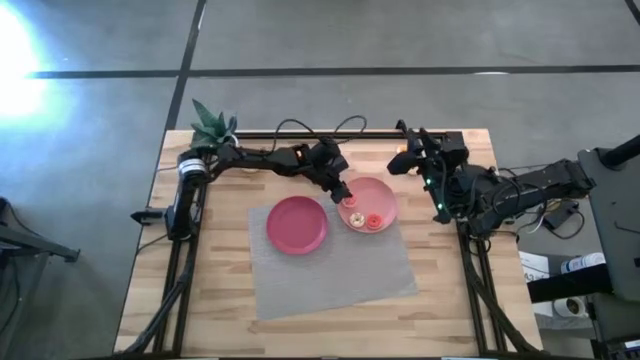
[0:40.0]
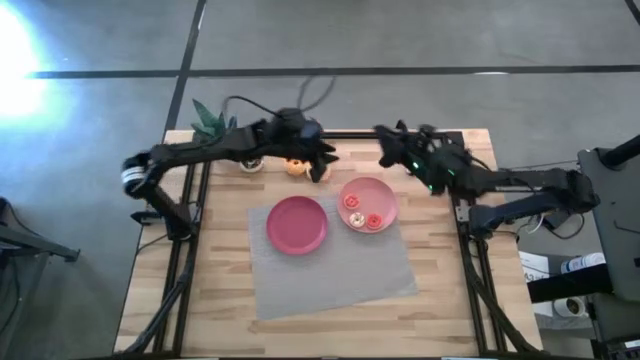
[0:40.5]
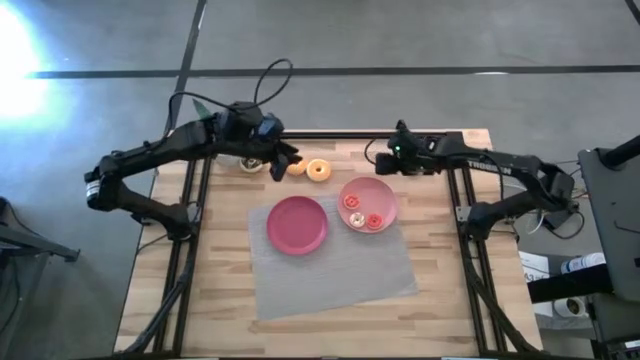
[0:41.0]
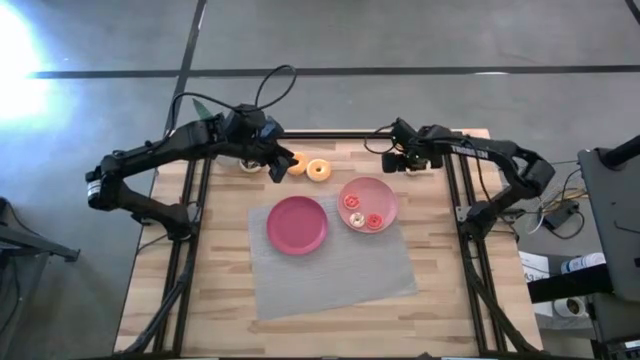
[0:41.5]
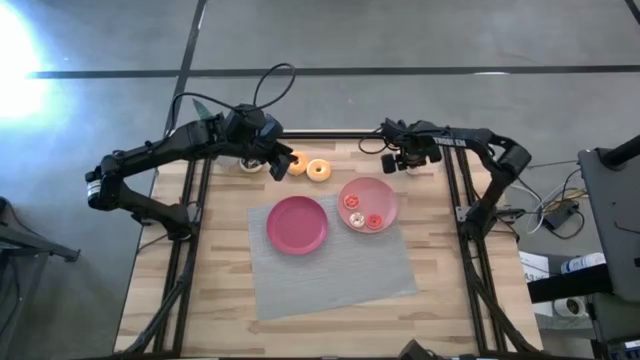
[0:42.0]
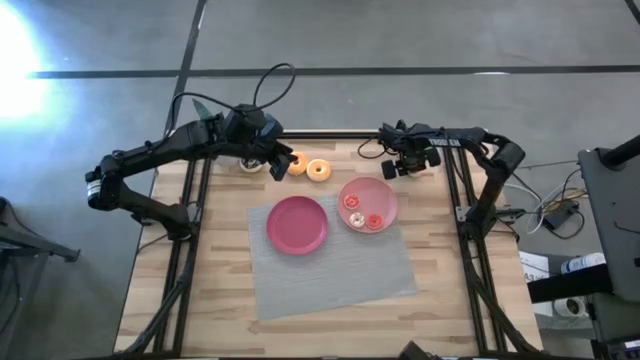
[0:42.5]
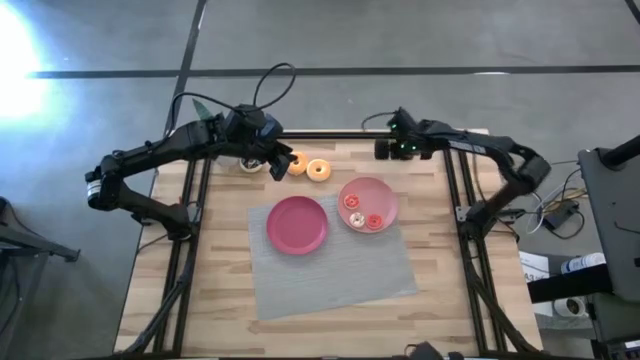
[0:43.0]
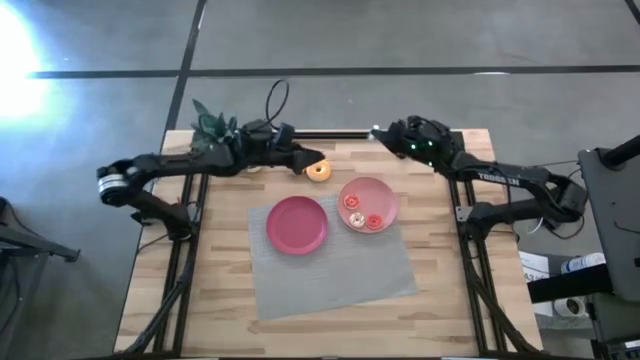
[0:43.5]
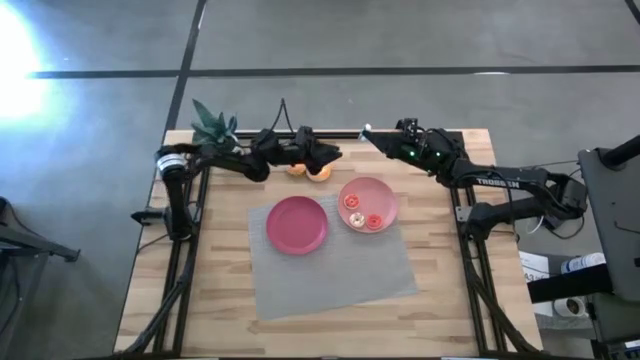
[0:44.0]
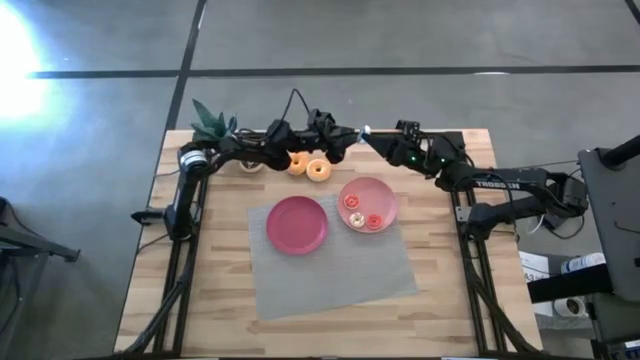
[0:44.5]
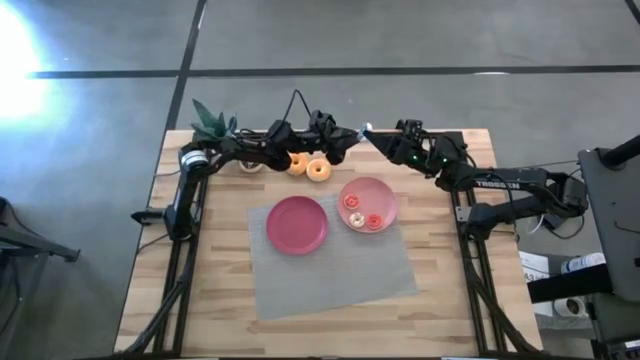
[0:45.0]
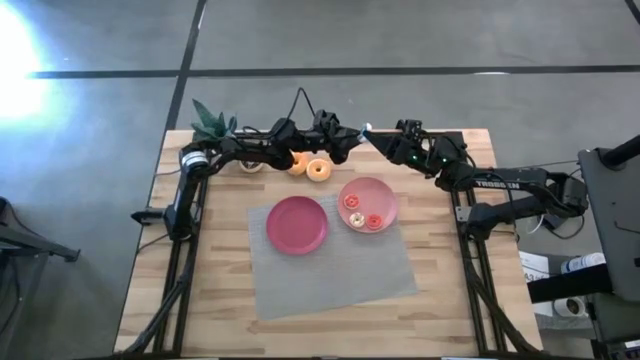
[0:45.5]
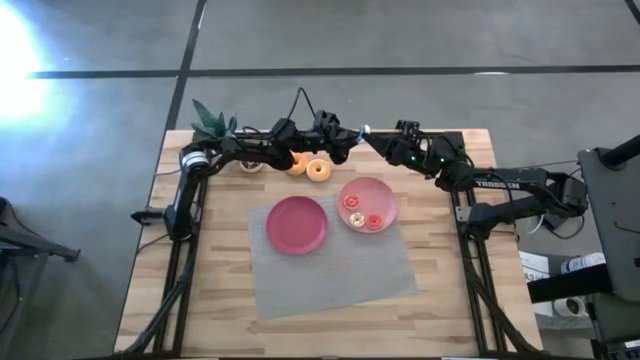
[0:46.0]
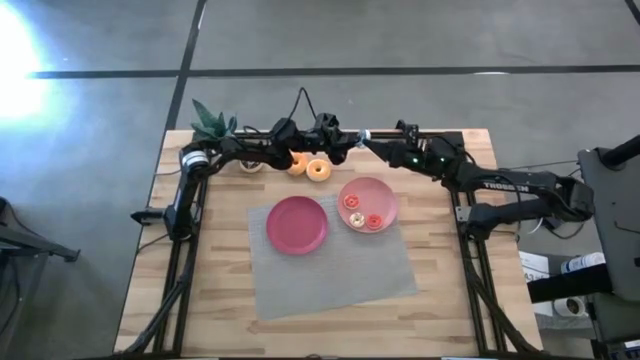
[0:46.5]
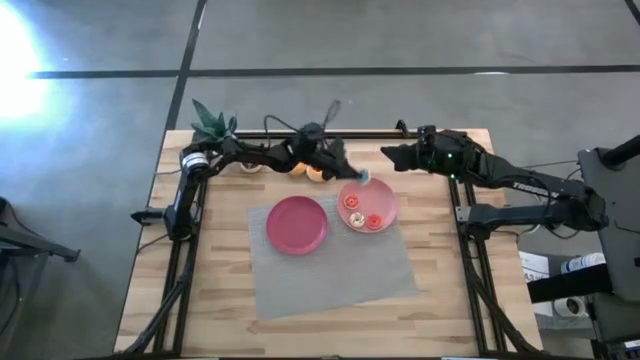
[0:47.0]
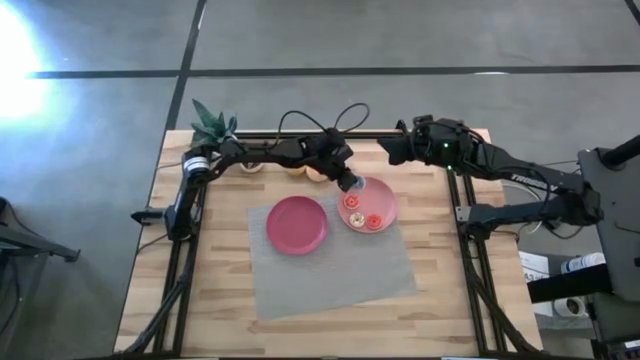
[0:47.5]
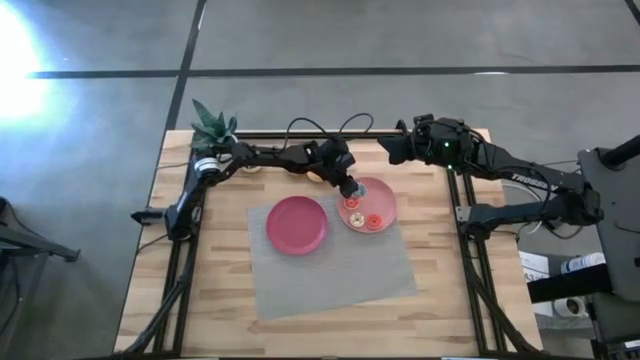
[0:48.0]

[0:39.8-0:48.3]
Task: Pick & Place donuts
Put the small blue donut on the pink plate

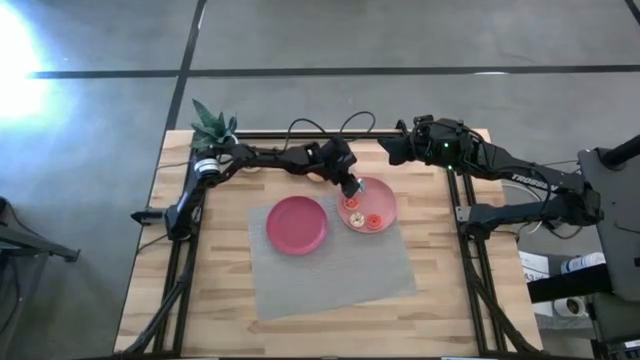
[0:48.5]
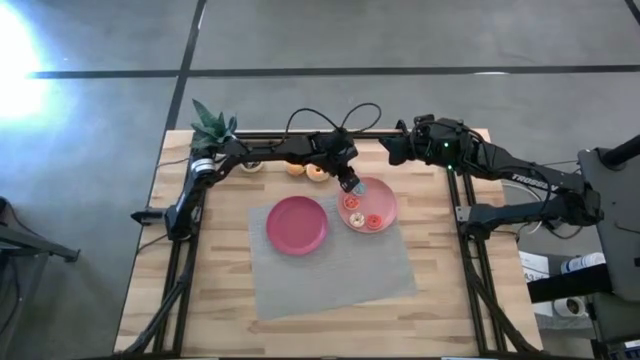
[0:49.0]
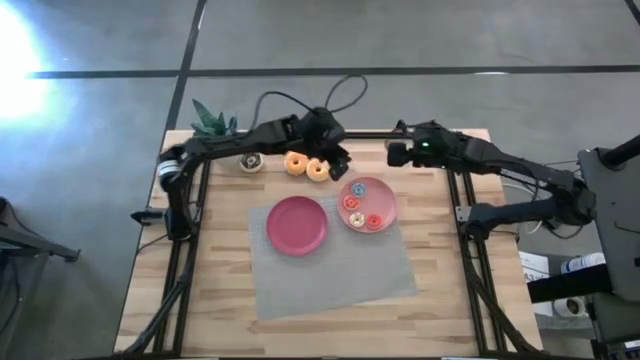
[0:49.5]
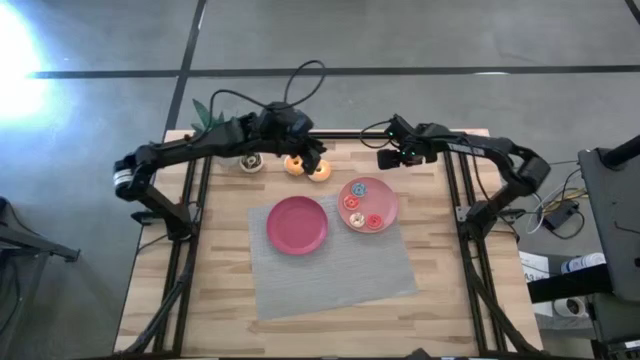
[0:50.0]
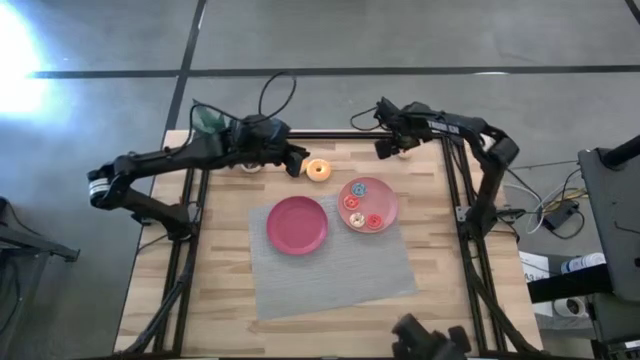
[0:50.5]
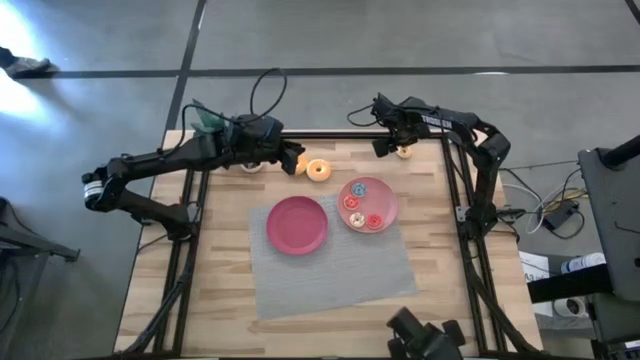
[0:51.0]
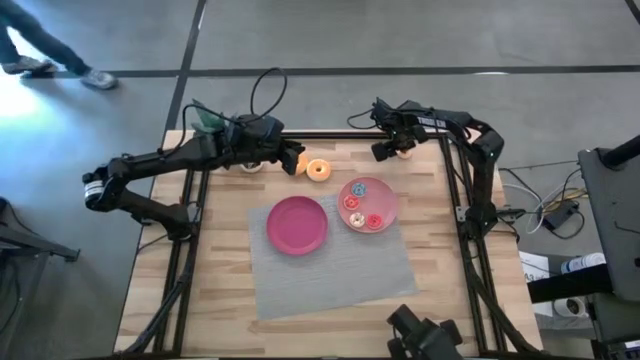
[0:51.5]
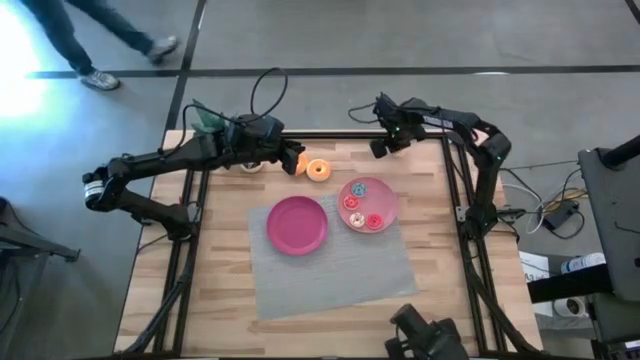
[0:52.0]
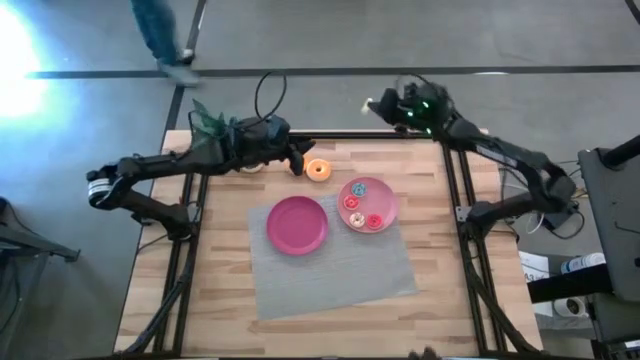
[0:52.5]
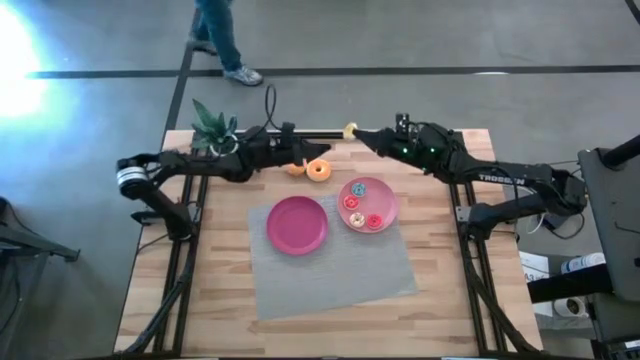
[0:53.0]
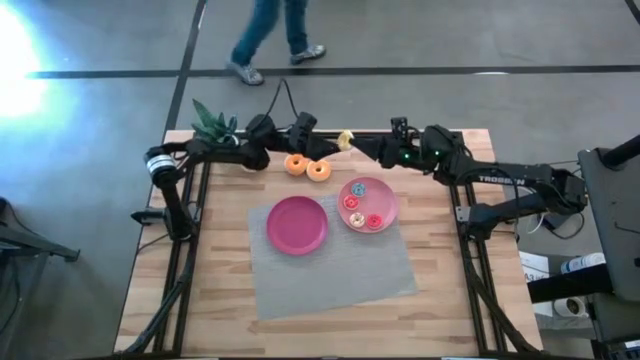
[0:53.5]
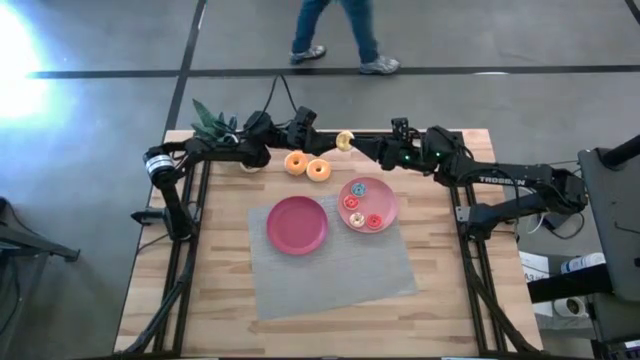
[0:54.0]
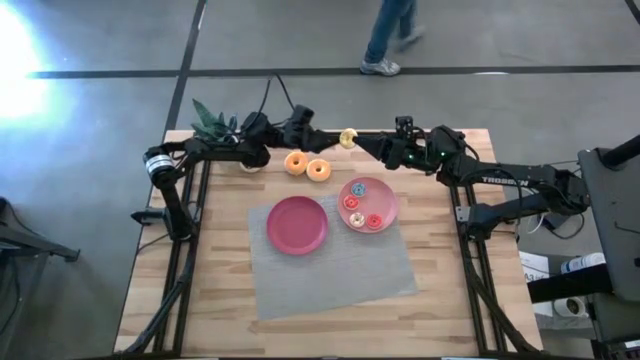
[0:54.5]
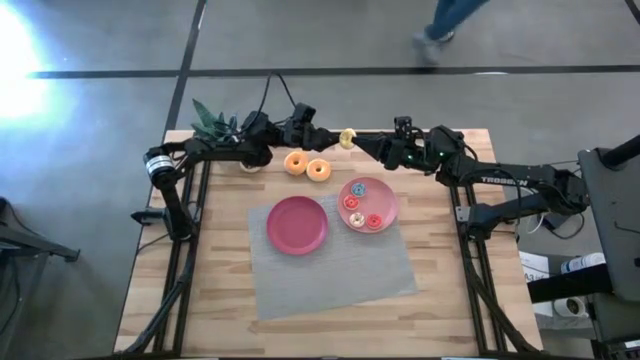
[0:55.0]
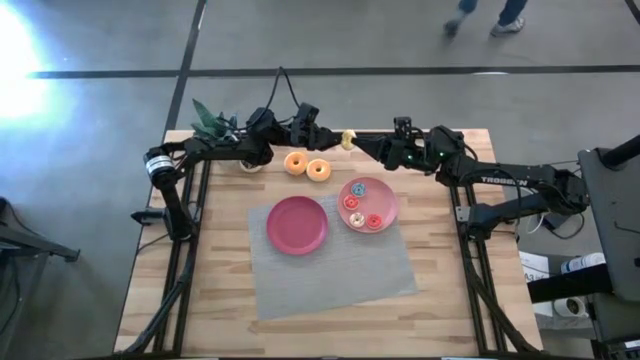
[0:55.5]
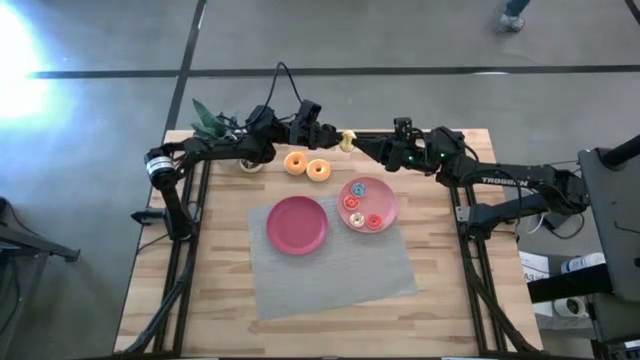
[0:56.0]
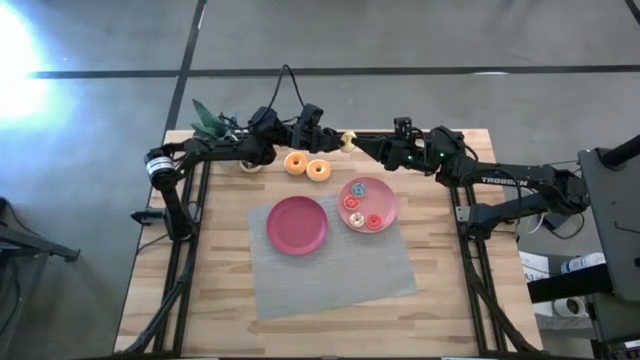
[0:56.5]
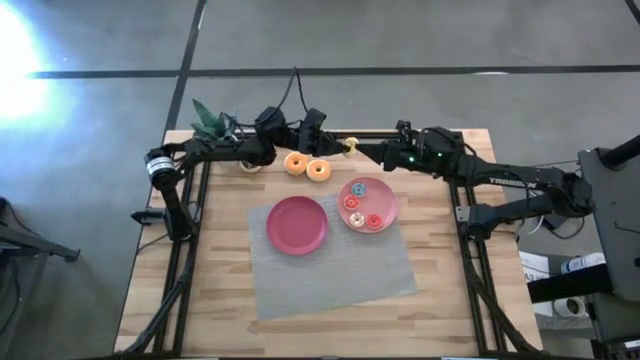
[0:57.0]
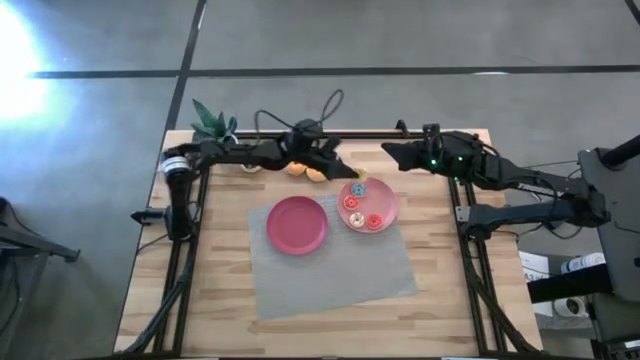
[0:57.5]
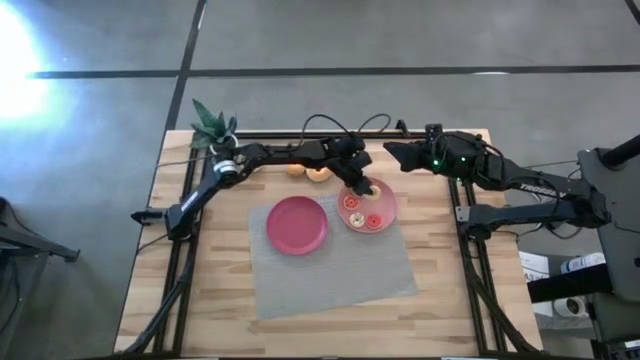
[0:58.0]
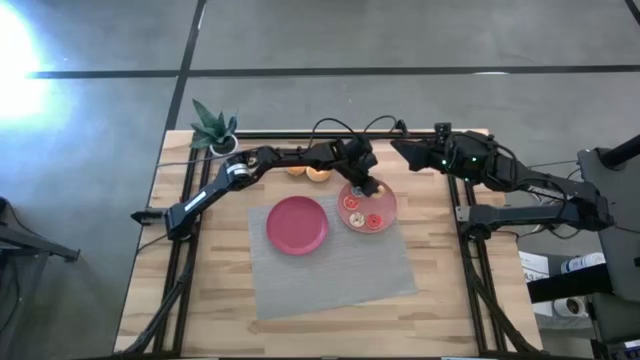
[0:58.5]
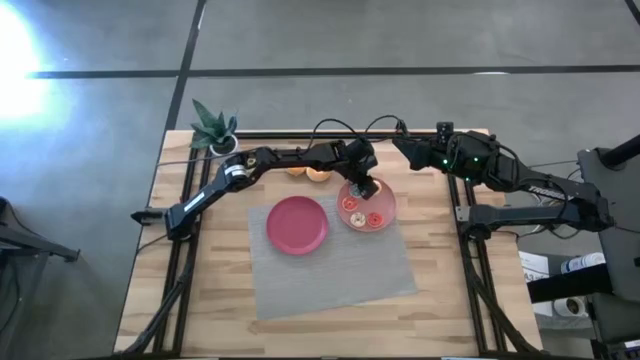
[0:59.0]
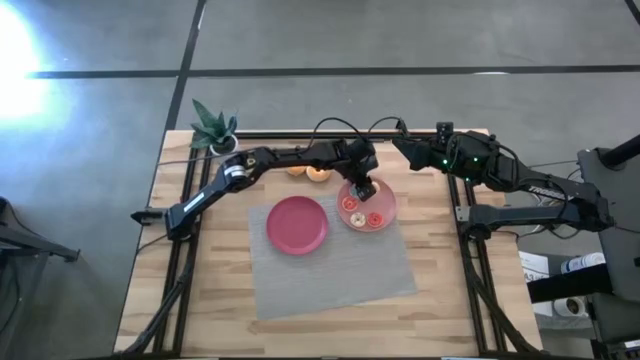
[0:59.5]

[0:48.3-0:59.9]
Put the small yellow donut on the pink plate
